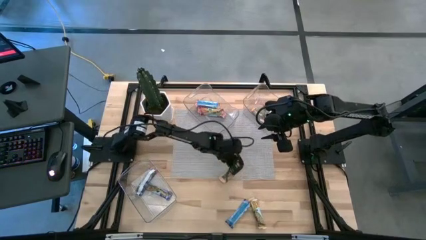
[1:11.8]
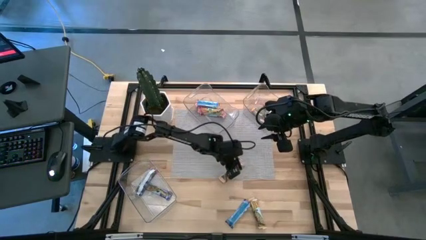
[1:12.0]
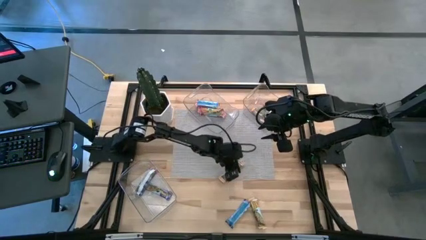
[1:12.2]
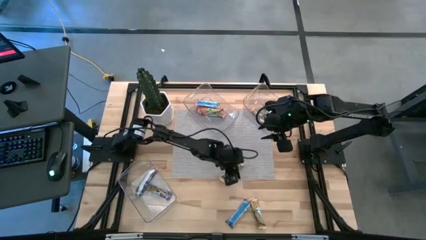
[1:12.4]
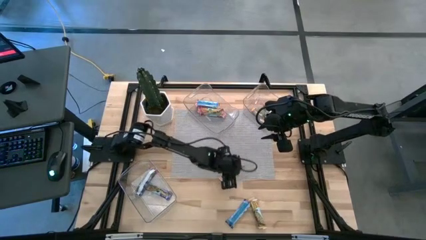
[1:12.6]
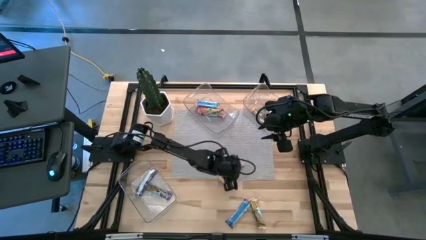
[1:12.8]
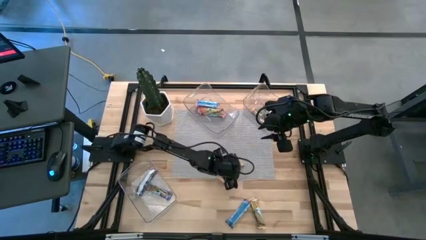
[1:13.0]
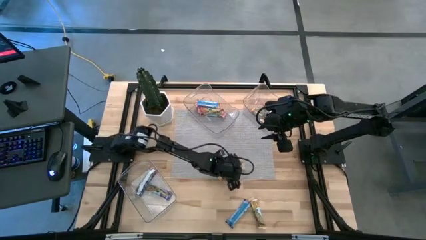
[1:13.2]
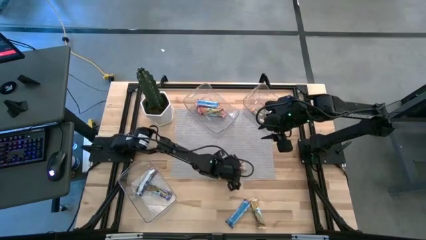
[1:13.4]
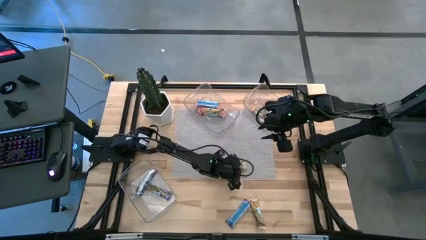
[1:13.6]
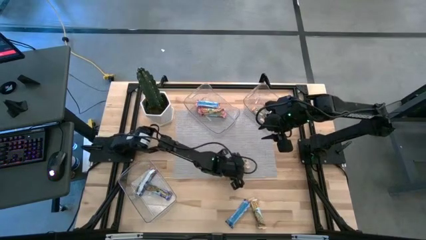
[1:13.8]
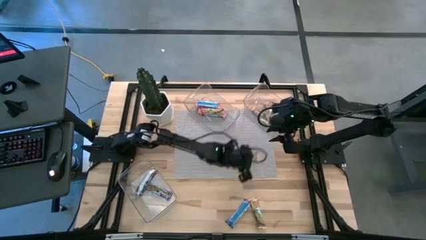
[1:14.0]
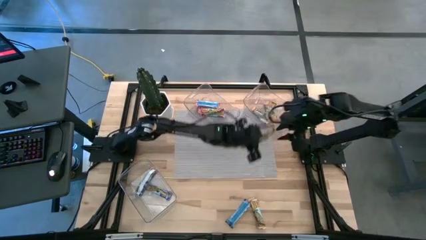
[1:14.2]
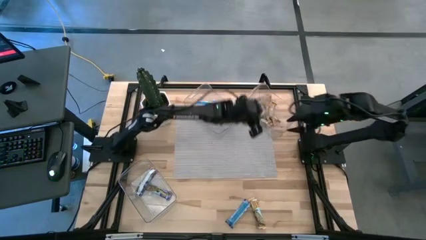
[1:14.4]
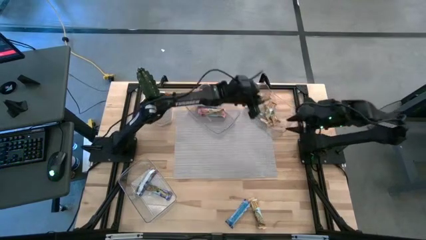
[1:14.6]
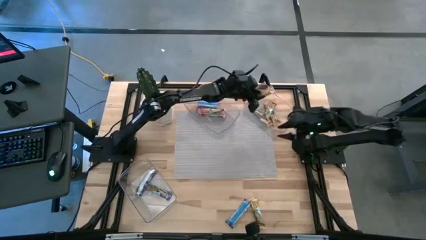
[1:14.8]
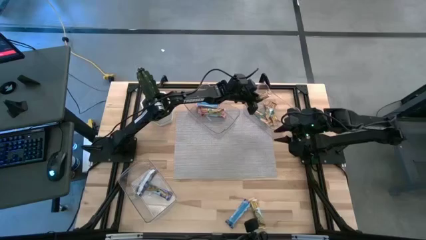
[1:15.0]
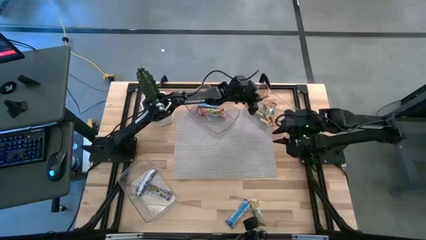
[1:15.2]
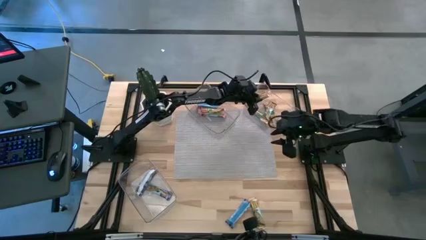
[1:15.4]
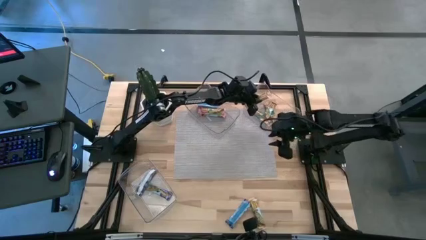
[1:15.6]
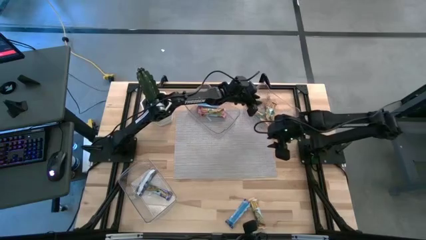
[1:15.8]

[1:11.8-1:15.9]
Task: Pick and place Granola Bars by type
Put the yellow granola bar into the top right transparent bin

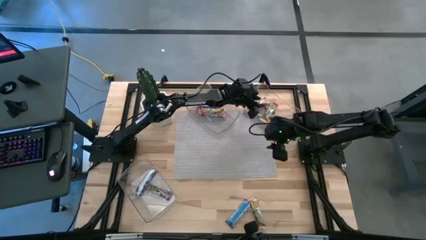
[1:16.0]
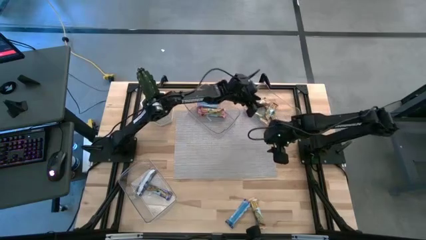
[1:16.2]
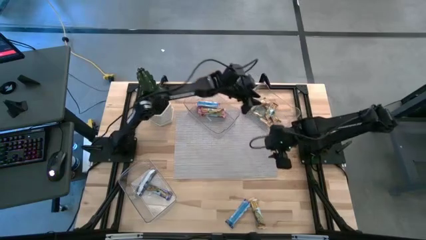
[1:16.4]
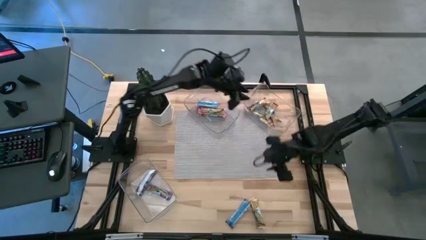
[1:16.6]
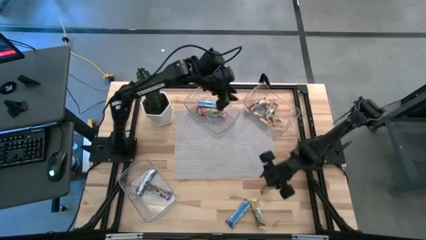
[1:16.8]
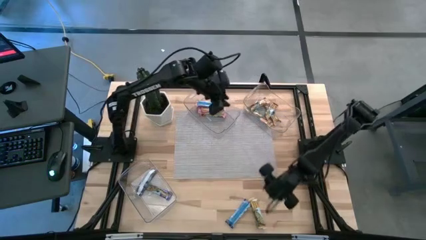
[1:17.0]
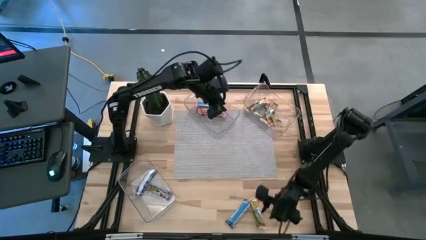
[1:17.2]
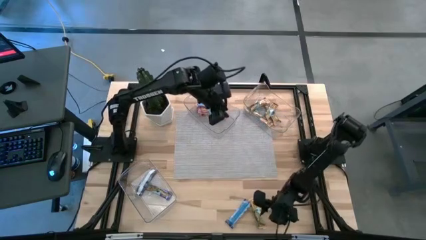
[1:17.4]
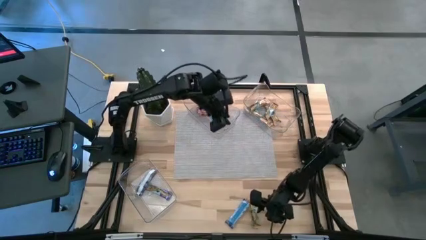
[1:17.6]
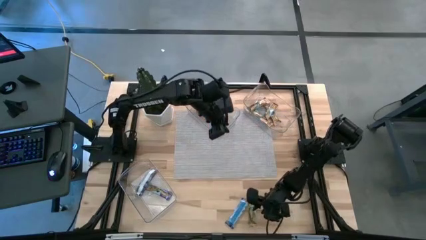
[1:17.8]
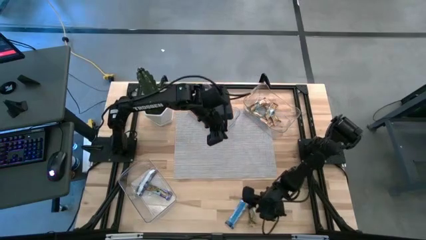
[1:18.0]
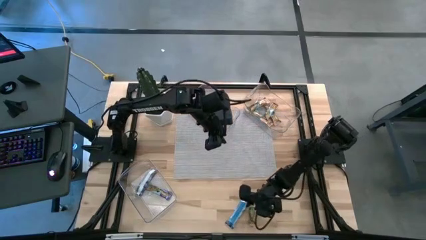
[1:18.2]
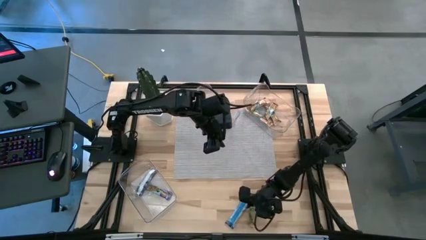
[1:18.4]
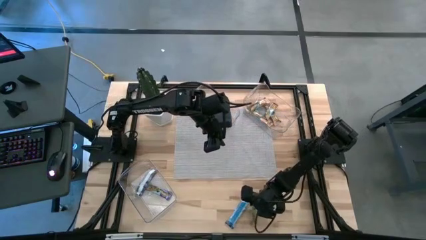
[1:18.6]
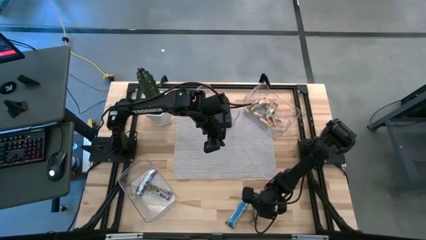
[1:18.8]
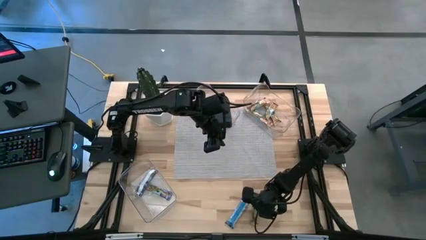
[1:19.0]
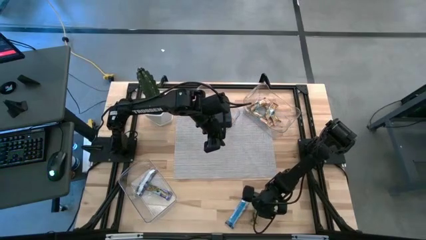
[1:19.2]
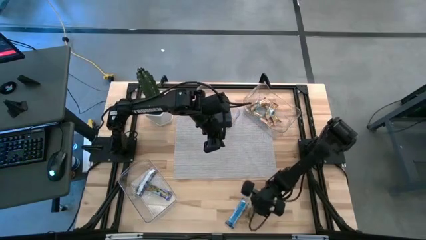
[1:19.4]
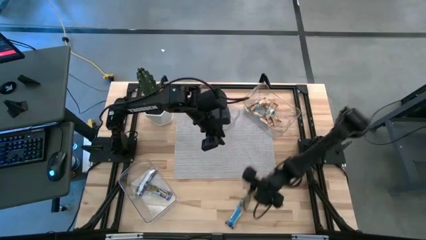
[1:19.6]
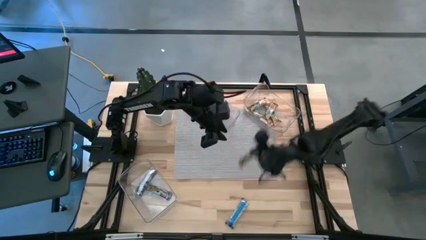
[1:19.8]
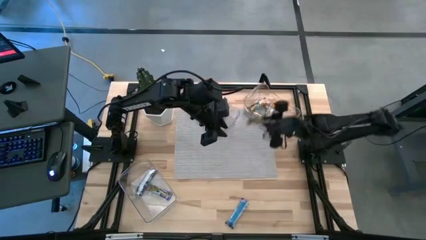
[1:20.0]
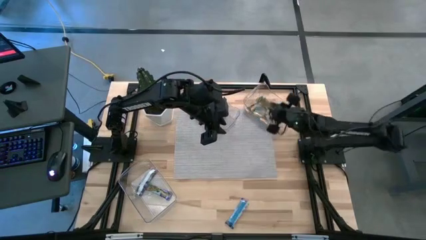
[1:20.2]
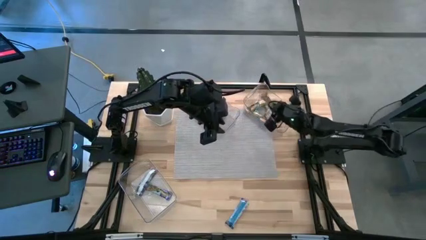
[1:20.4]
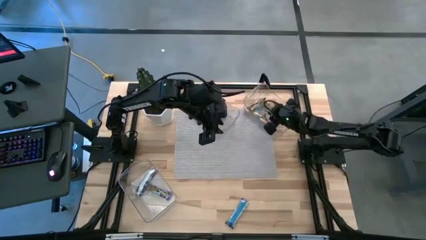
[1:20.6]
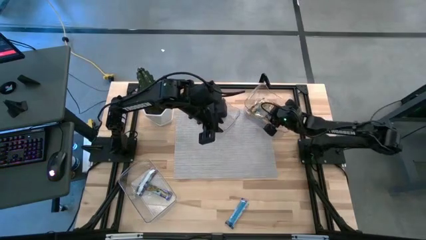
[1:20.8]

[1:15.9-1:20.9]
Put the yellow granola bar into the top right transparent bin

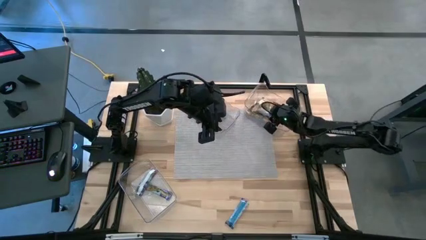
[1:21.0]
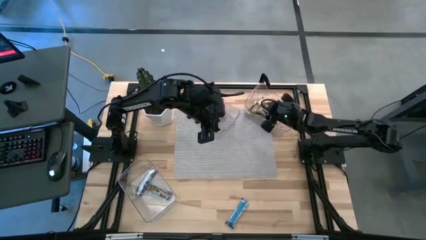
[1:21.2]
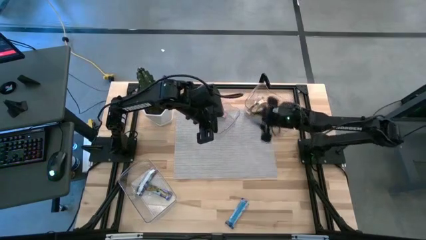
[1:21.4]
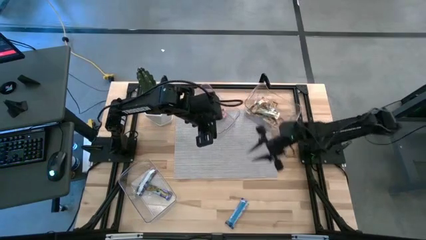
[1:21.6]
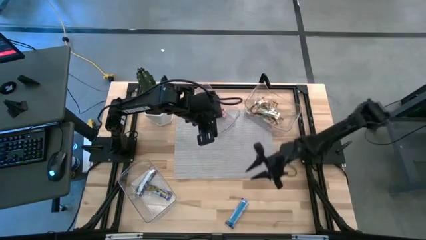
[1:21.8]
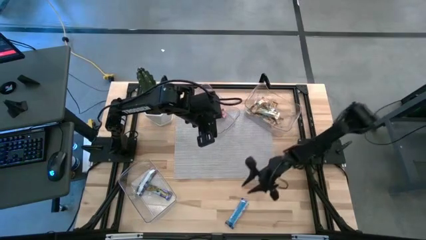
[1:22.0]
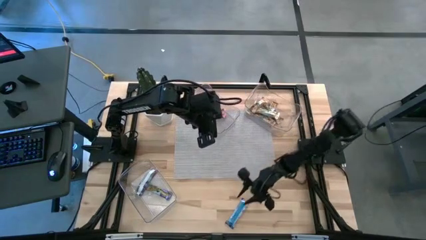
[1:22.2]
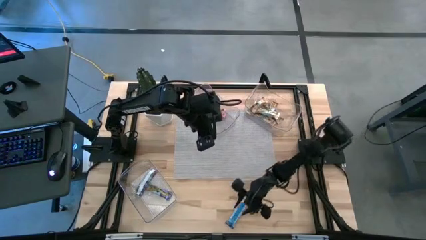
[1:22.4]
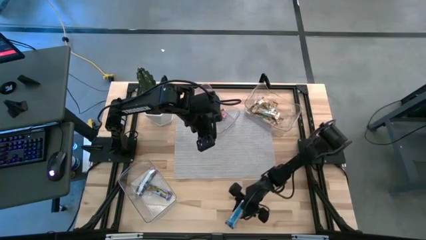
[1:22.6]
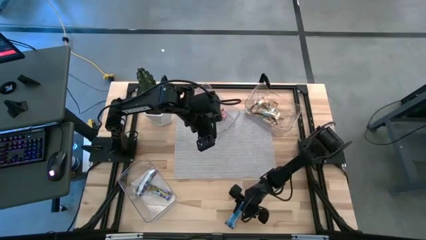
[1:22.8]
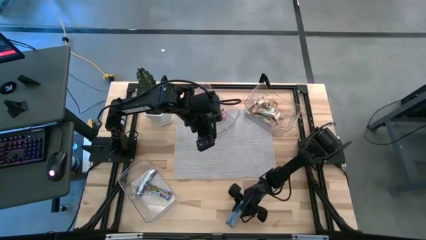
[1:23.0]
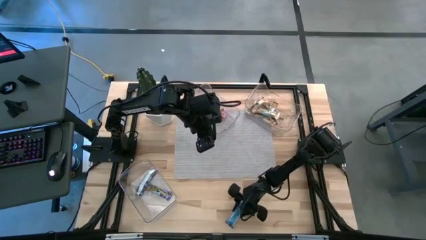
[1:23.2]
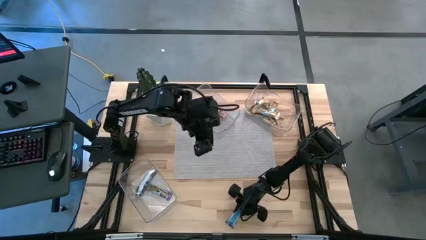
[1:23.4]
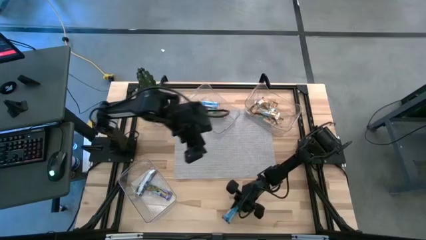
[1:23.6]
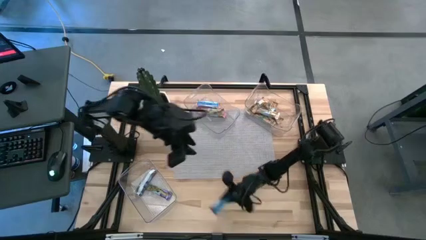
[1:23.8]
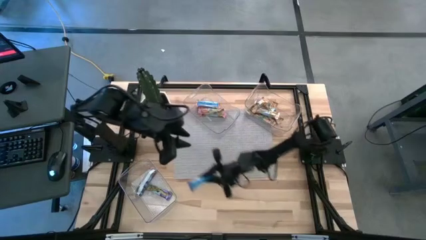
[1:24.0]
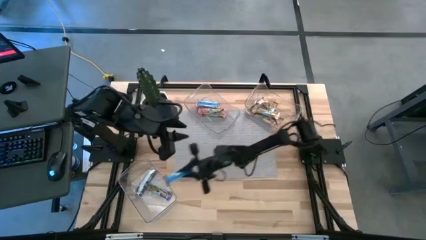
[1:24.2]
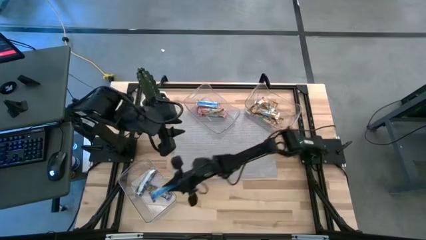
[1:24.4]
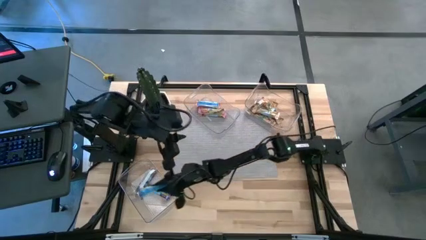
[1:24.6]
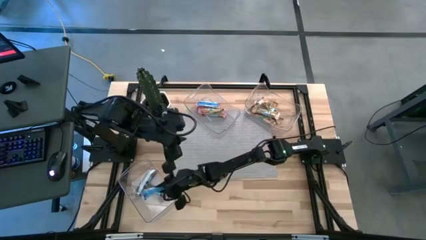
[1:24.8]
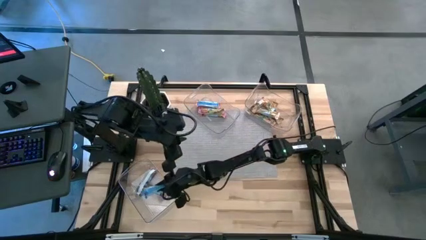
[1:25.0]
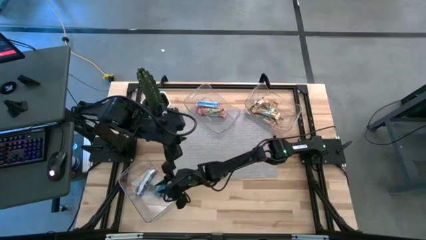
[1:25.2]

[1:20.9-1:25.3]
Put the blue granola bar into the bottom transparent bin

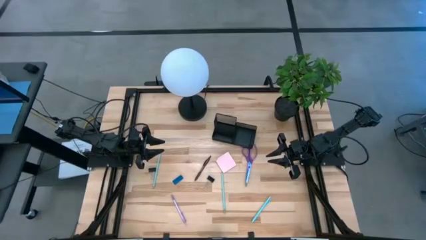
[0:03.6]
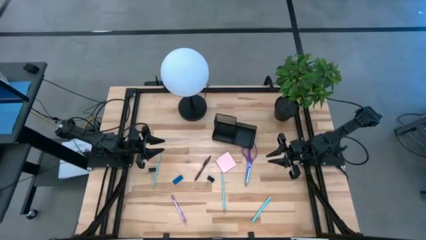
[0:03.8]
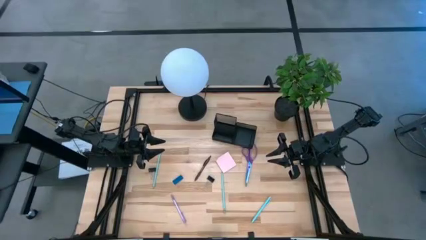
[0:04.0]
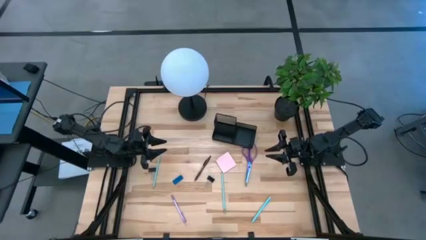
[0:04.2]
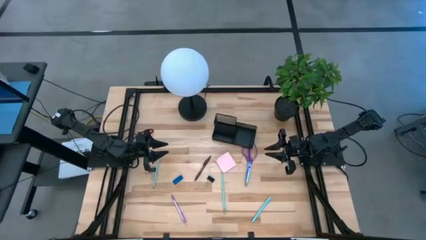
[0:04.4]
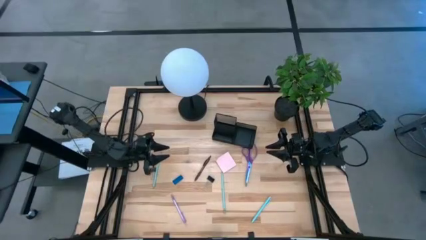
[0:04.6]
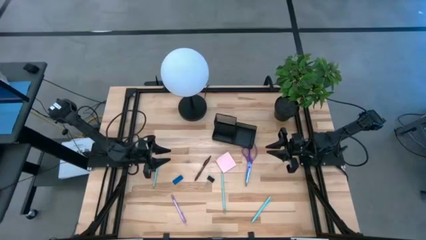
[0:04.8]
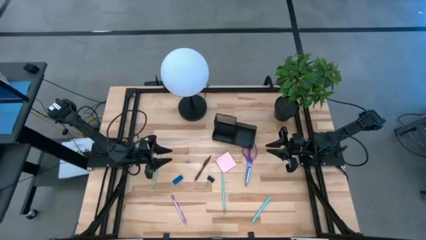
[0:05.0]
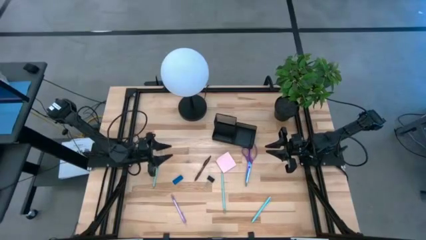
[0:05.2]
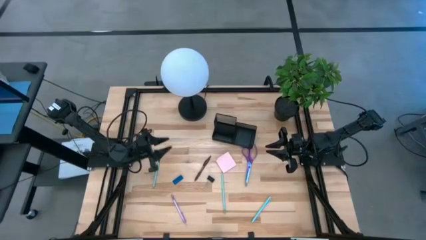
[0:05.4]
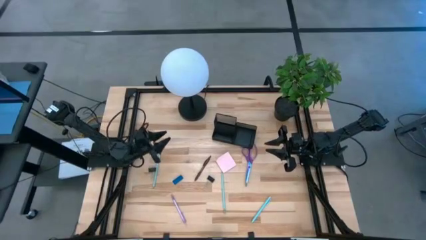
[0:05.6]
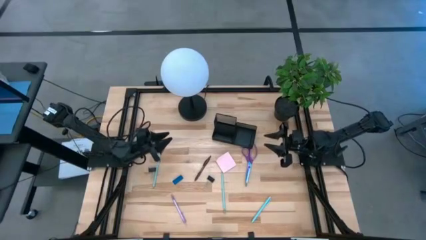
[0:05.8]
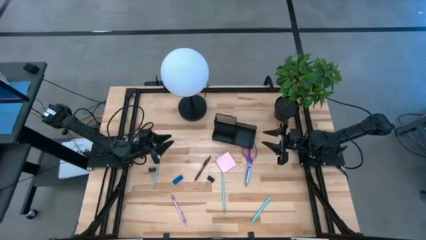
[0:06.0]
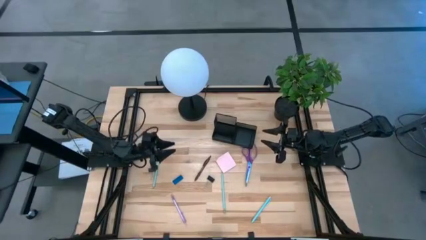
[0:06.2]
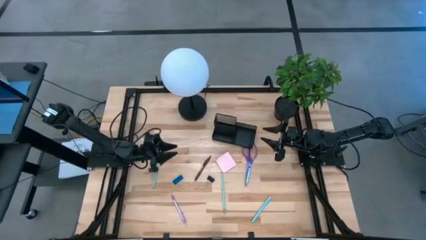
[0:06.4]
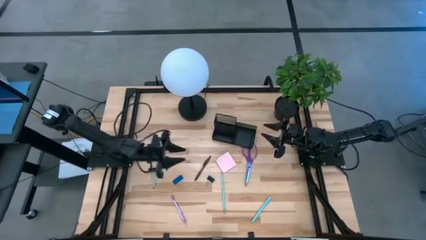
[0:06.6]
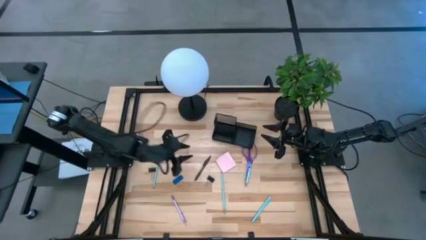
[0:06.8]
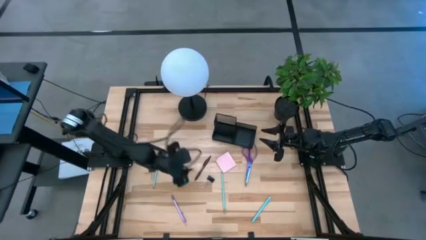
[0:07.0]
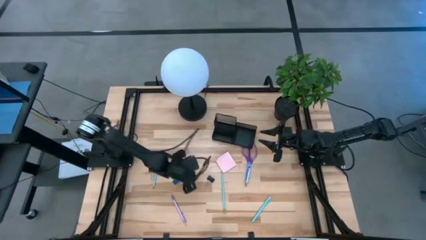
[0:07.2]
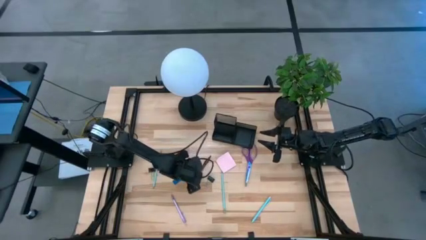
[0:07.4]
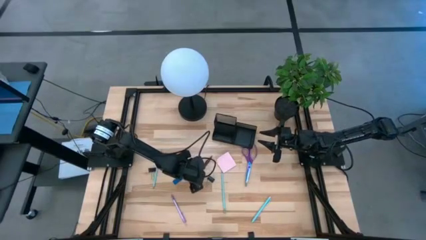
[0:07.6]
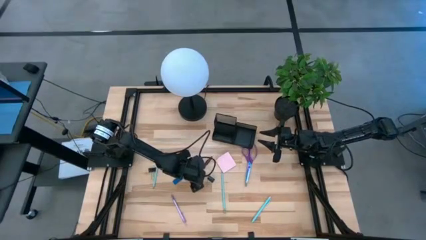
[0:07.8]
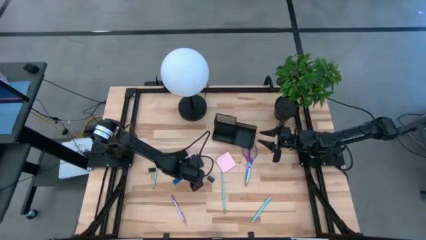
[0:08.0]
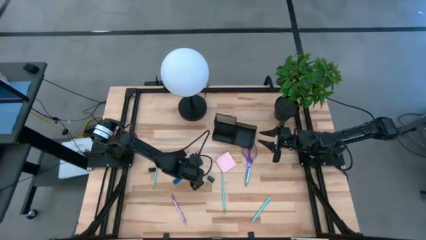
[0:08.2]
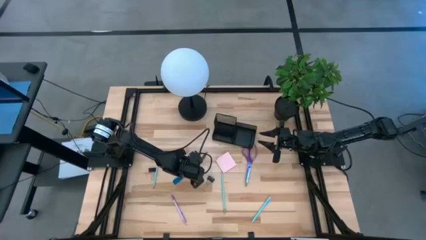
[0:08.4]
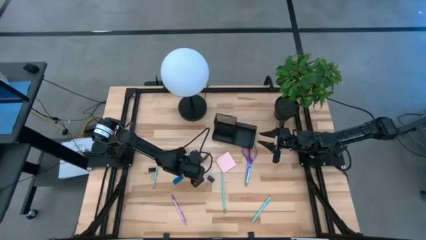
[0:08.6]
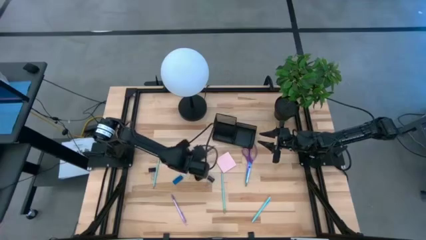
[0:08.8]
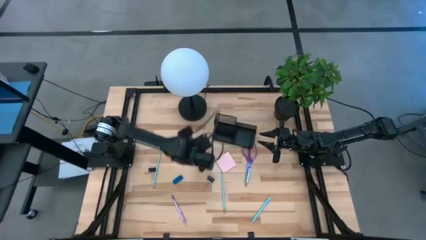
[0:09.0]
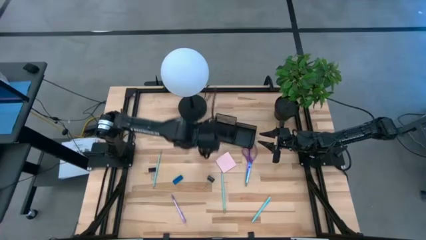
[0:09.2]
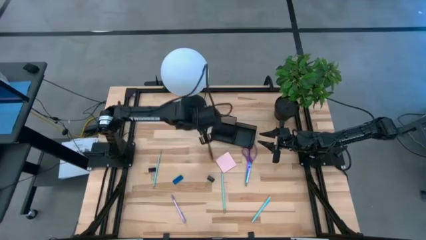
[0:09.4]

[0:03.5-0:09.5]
Task: Pick and place office supplies into organizer
Put the brown pen into the desk organizer
